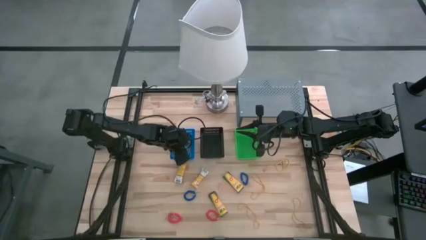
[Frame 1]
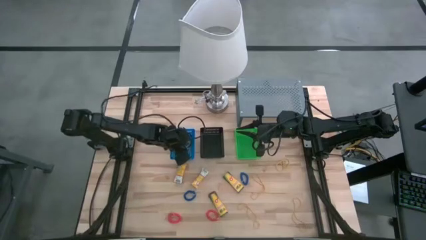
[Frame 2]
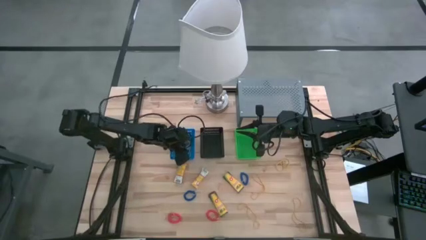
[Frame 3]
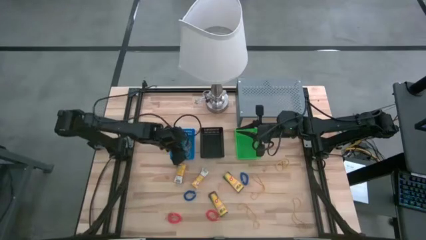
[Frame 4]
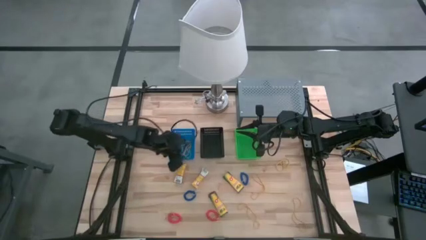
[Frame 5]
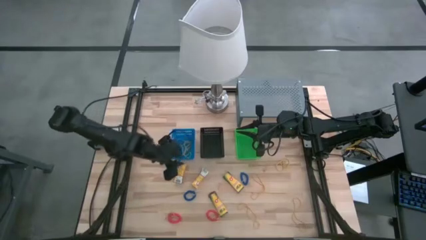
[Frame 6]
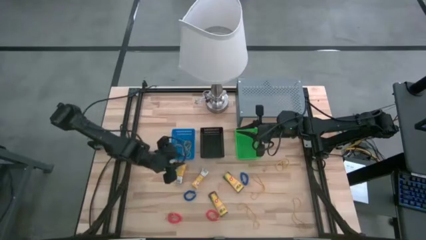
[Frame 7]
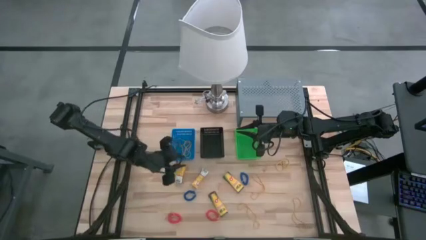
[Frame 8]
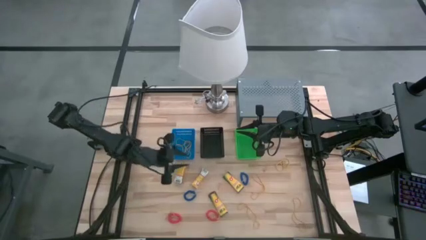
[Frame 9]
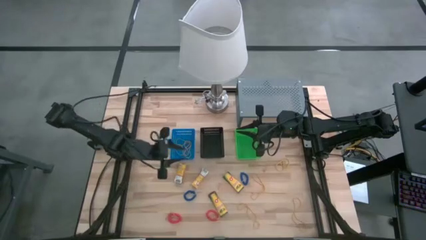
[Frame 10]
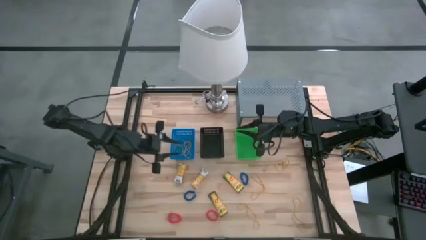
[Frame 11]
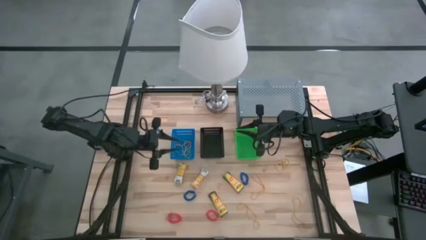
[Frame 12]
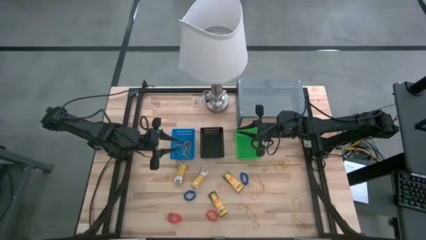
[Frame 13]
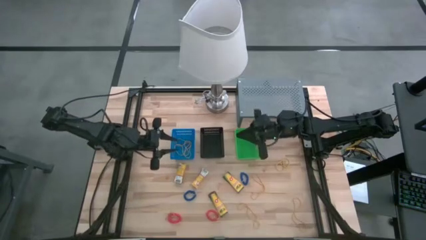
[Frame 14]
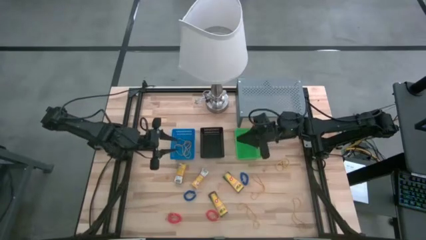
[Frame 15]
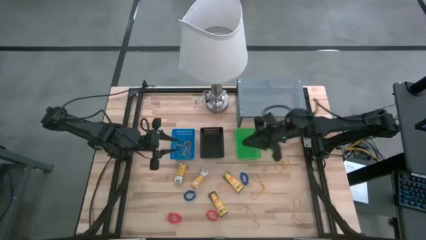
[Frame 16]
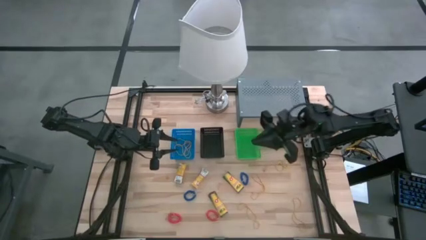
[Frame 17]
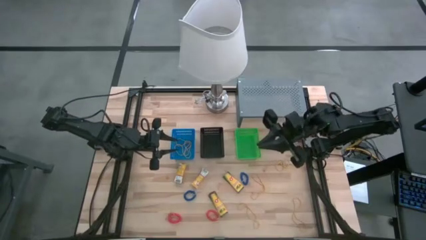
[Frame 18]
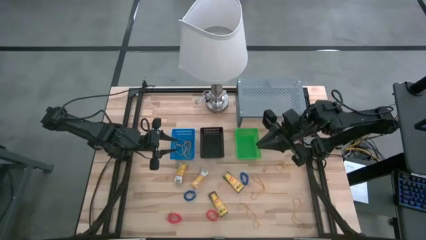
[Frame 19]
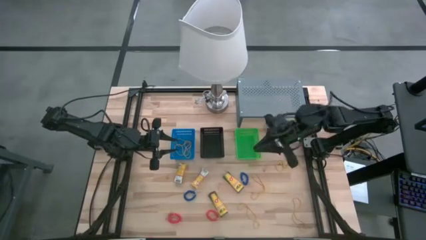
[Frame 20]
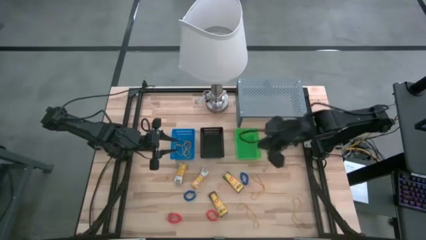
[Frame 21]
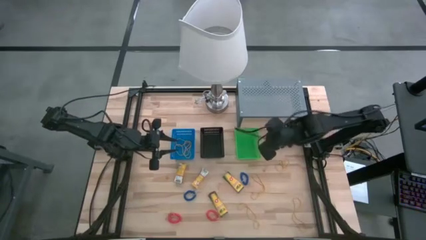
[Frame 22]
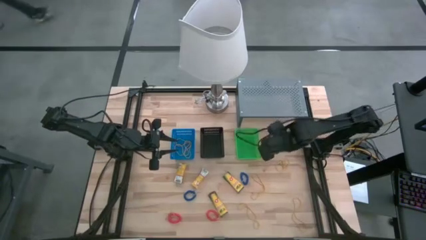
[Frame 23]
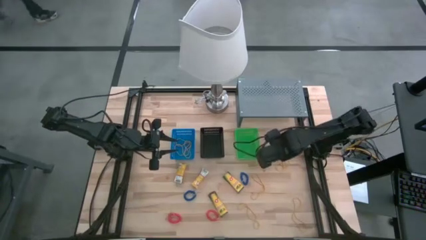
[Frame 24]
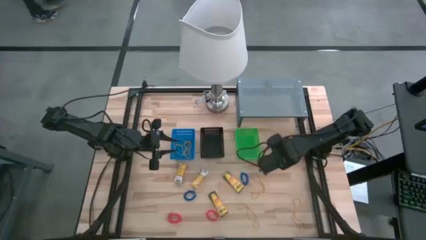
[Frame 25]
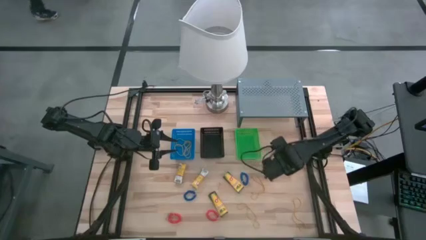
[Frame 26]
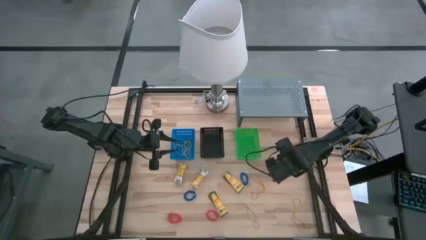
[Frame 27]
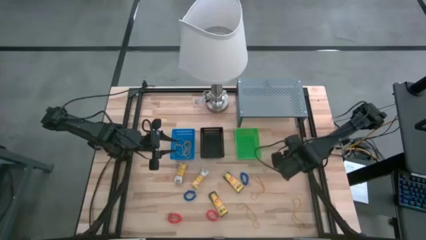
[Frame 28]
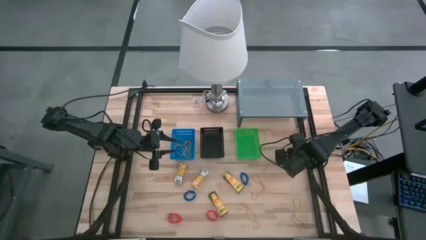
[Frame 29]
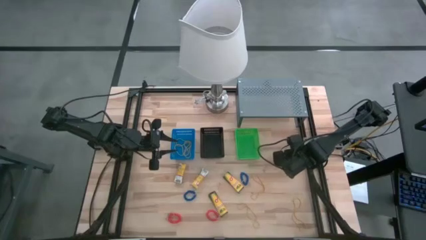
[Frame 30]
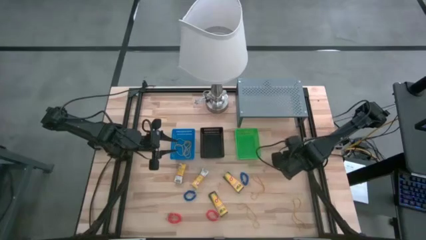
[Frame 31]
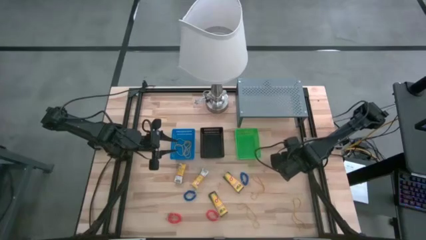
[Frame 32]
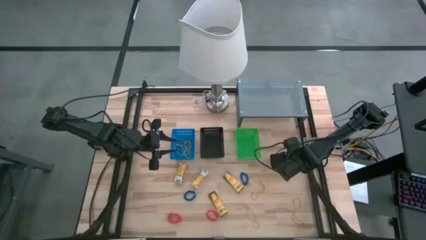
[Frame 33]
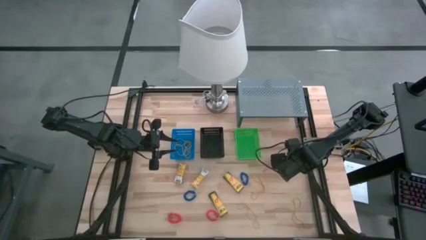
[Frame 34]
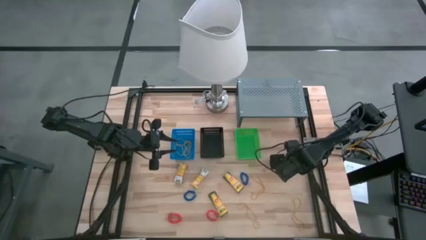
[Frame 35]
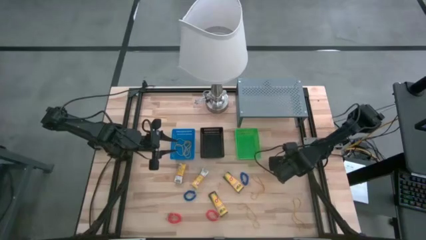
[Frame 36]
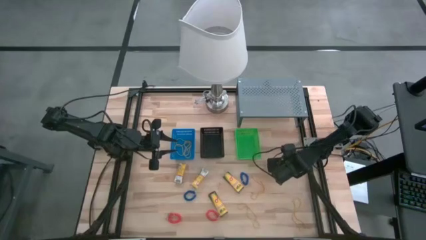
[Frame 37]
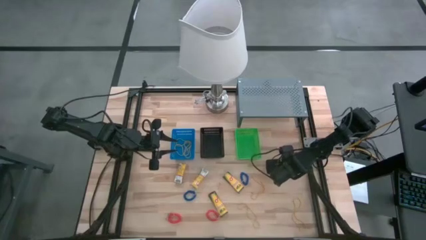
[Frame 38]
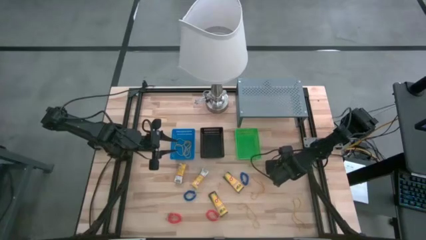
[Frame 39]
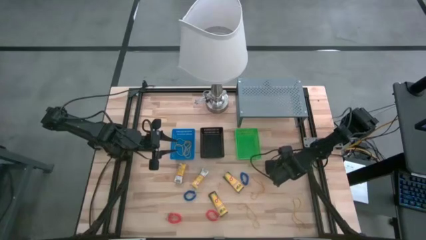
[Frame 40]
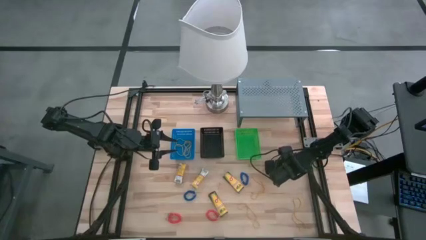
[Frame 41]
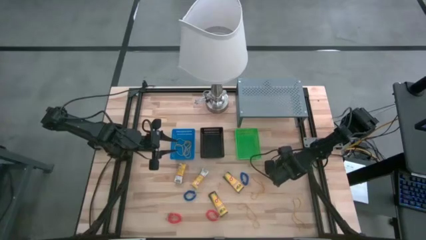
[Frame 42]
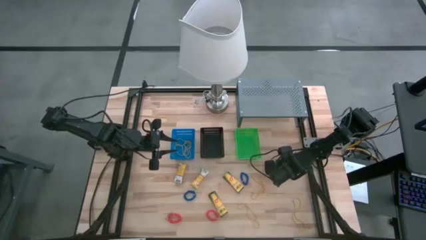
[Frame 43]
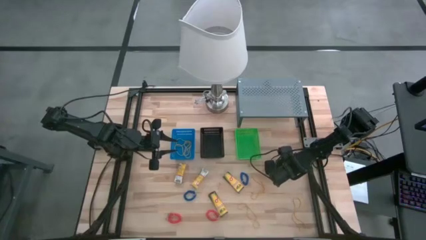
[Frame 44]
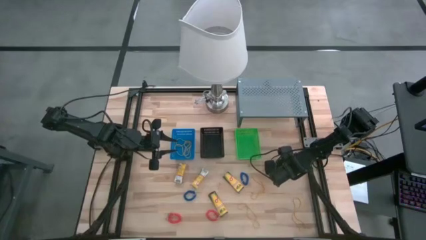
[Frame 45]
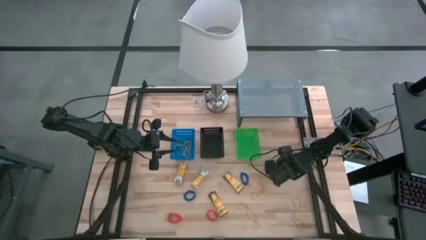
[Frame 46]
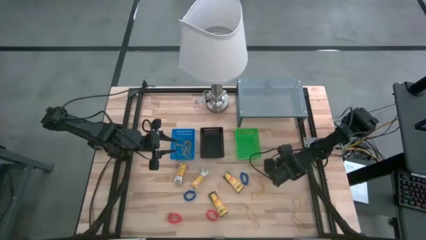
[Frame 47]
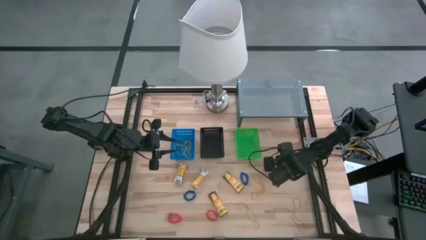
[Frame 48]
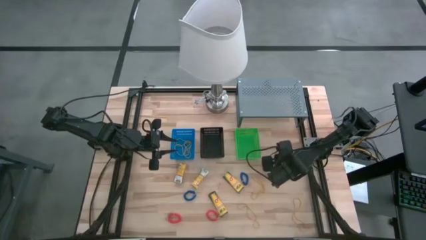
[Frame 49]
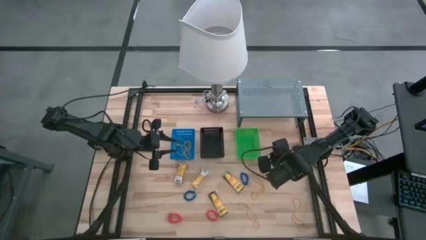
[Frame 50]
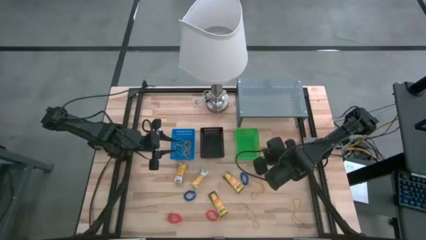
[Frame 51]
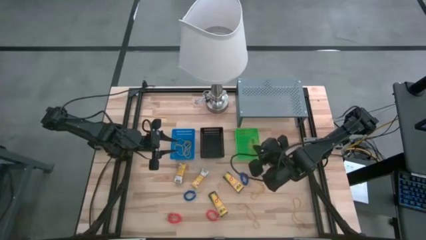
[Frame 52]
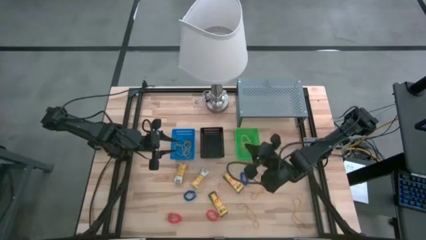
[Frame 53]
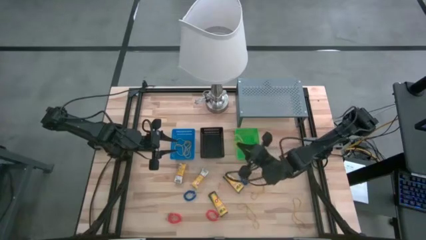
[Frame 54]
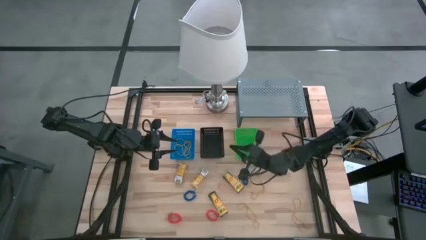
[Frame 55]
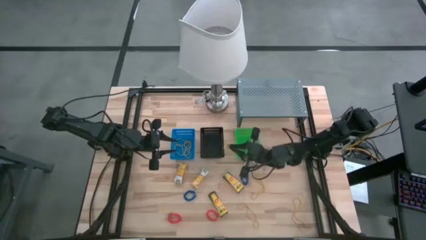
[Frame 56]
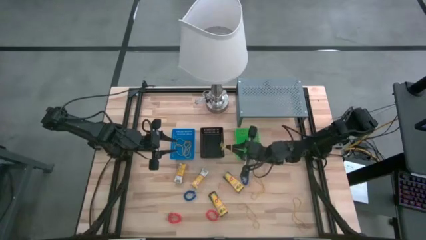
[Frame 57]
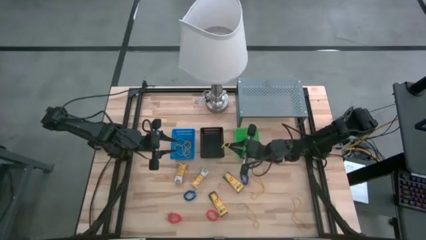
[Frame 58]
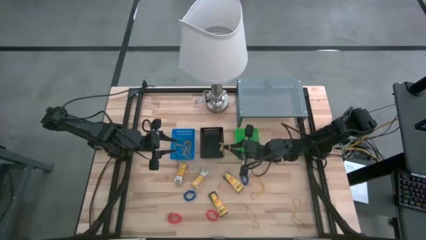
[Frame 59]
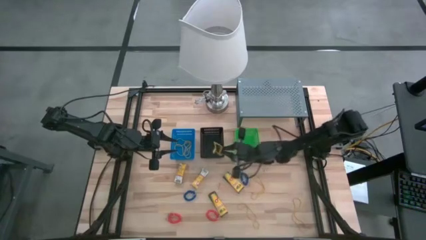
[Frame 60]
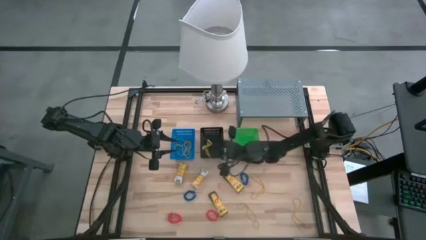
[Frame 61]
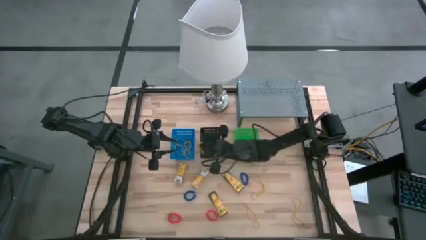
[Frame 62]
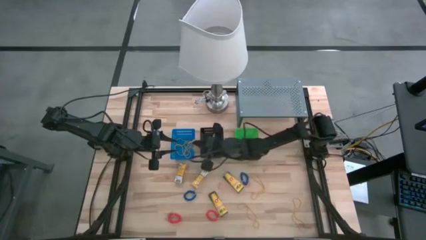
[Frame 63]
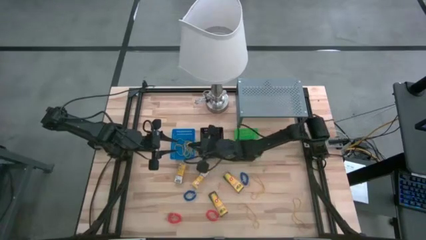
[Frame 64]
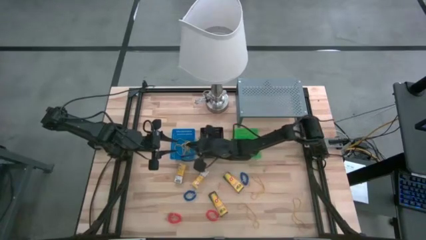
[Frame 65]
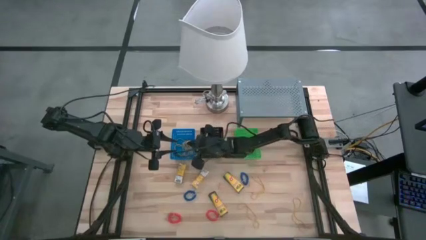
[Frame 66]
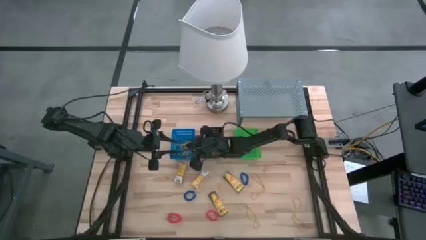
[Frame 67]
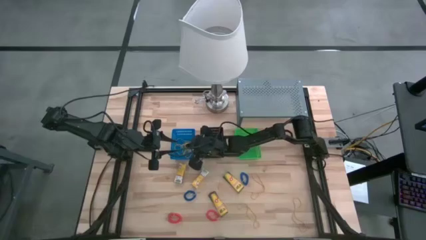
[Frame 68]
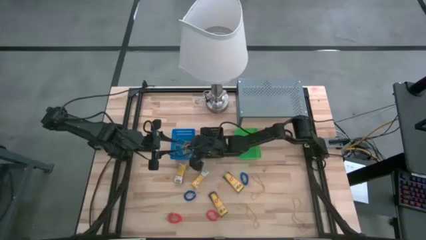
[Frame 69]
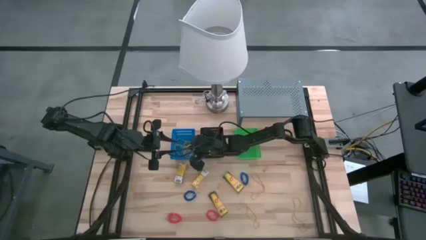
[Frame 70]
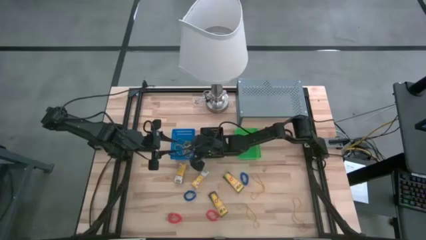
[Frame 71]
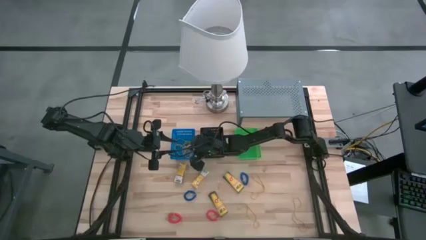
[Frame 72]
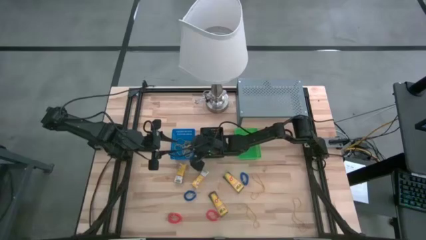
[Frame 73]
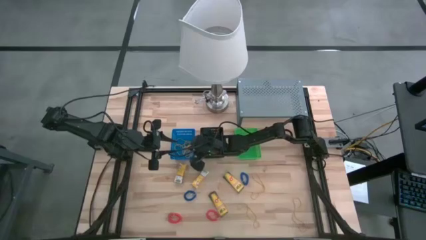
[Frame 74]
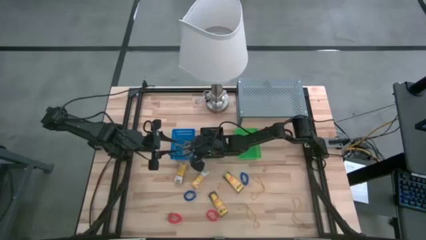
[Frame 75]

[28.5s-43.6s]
Task: Pick & Place Office Desk Supplies
Put the yellow rubber band into the blue bin
